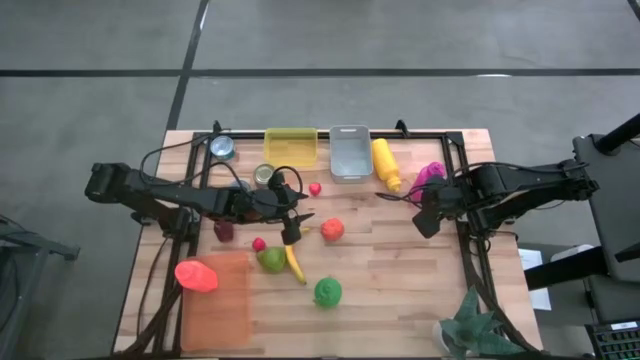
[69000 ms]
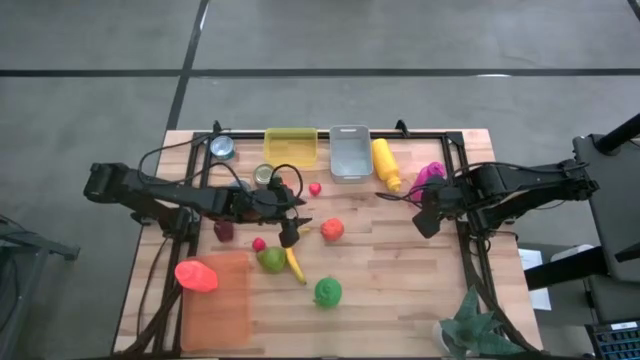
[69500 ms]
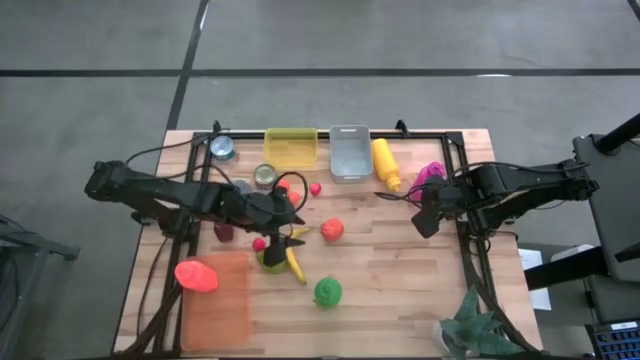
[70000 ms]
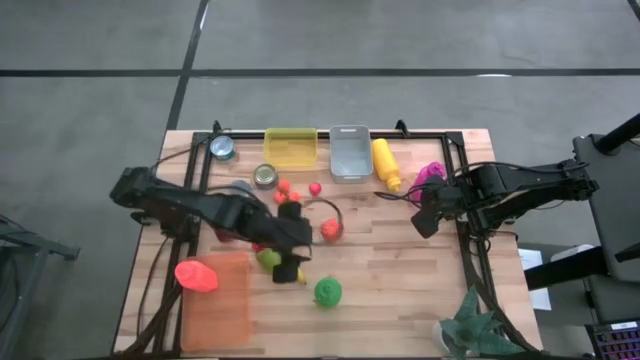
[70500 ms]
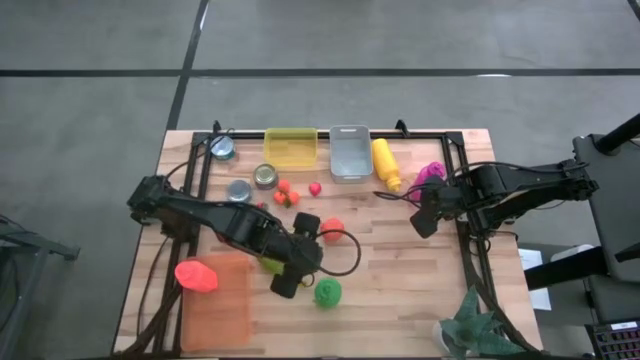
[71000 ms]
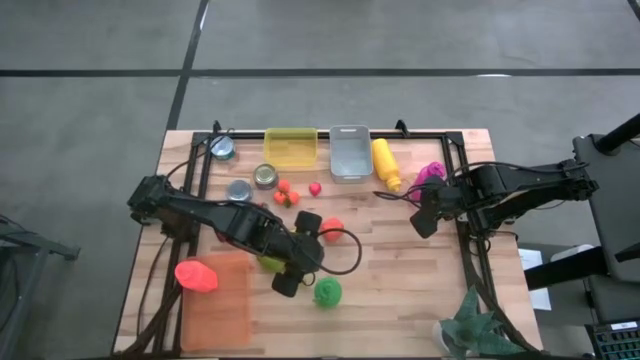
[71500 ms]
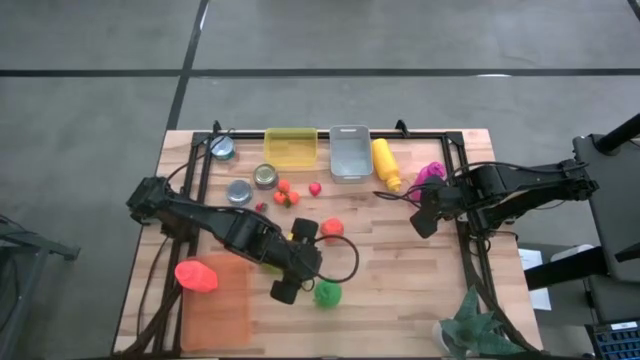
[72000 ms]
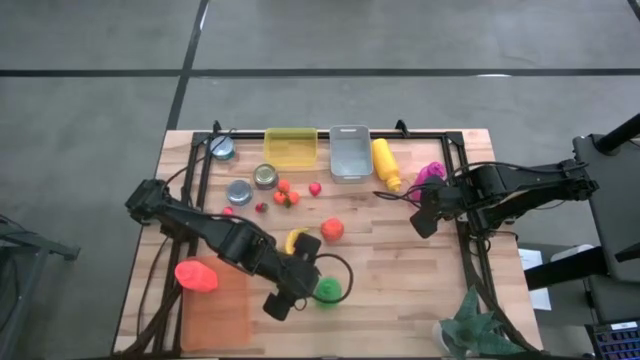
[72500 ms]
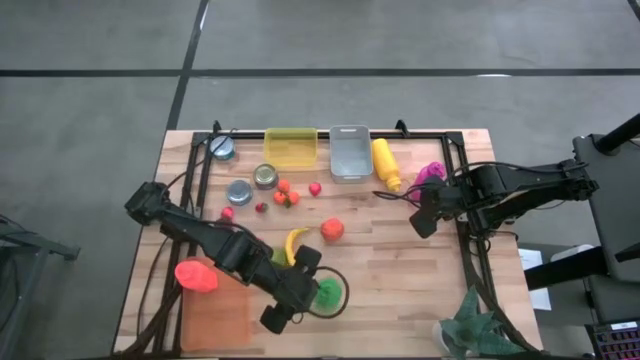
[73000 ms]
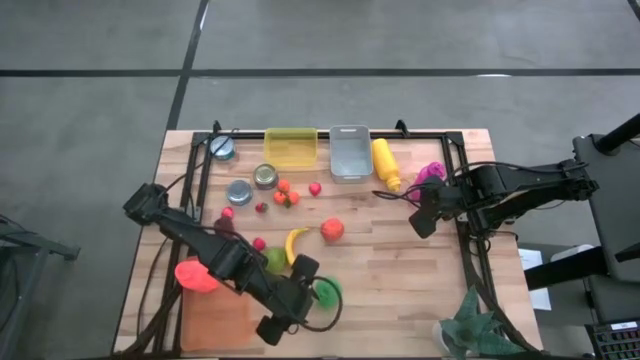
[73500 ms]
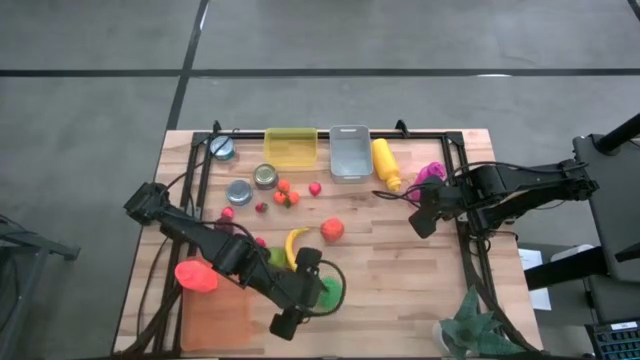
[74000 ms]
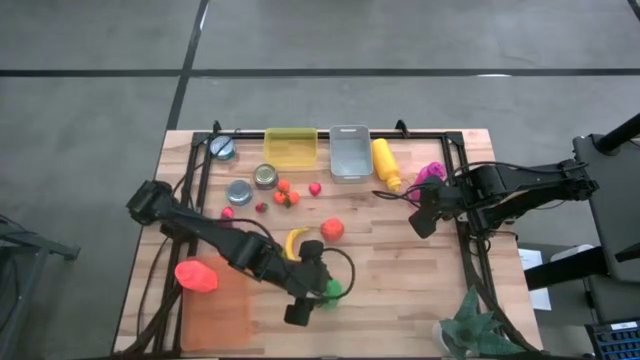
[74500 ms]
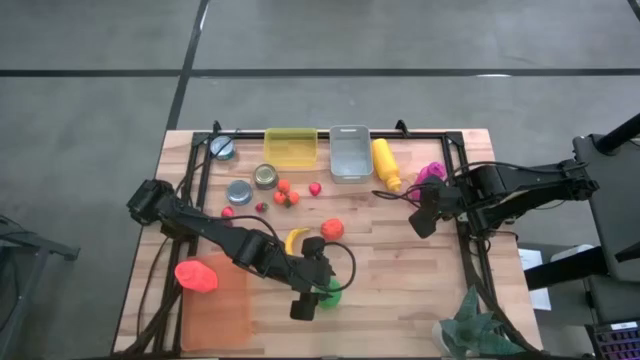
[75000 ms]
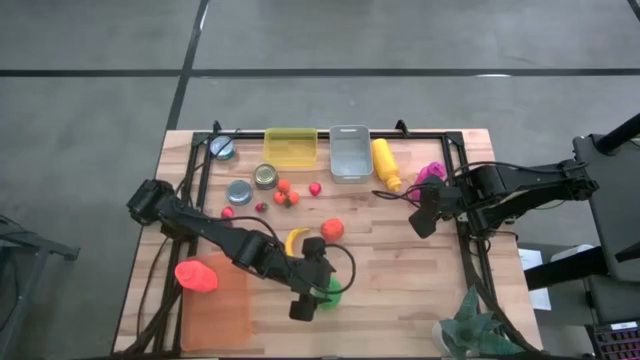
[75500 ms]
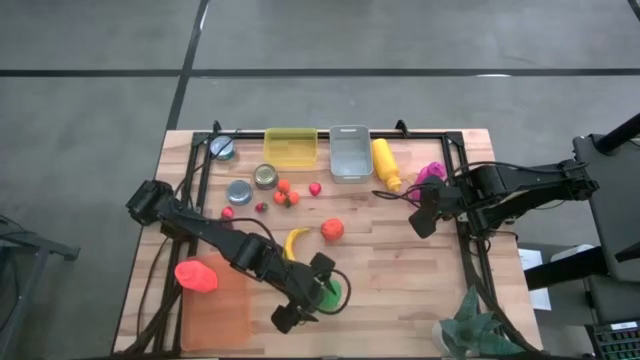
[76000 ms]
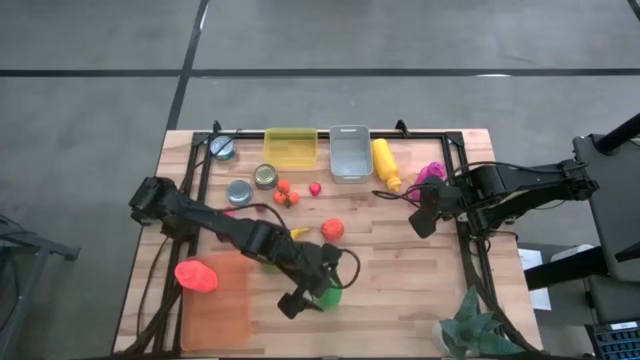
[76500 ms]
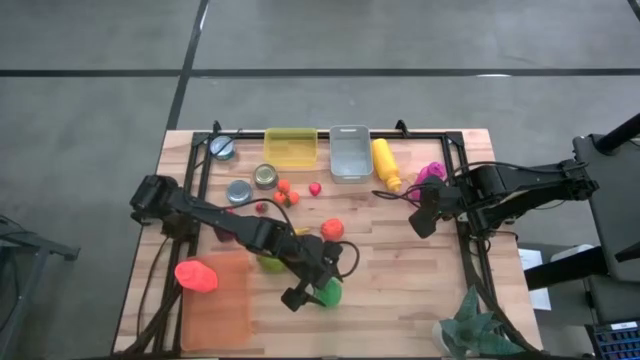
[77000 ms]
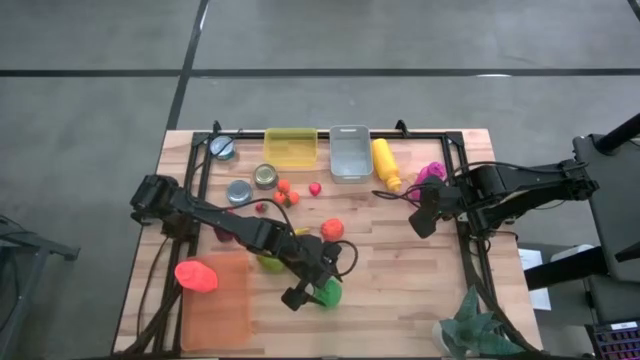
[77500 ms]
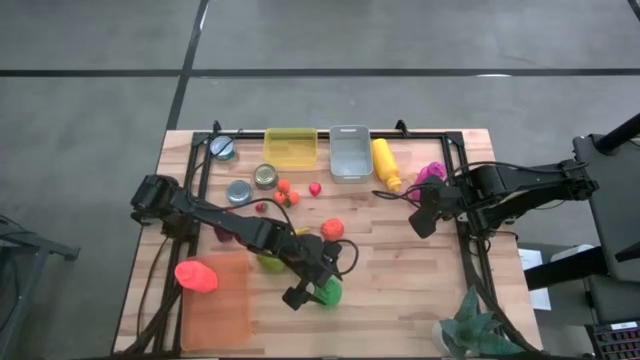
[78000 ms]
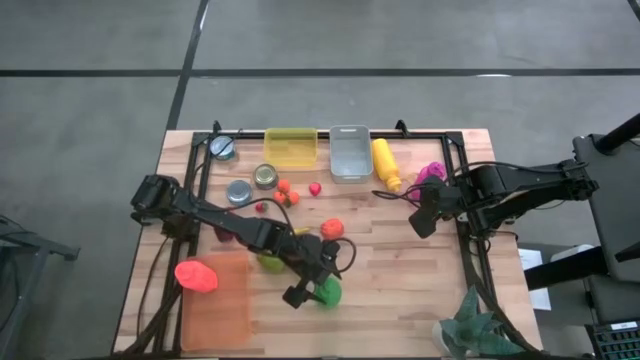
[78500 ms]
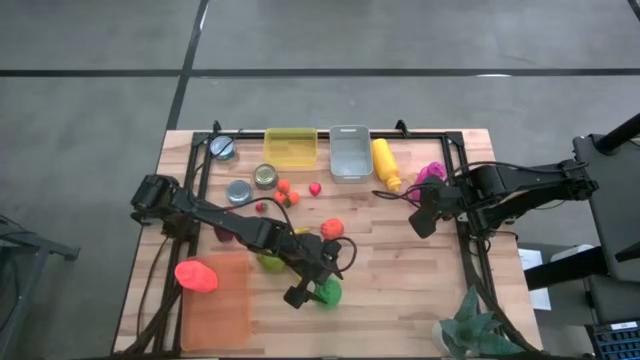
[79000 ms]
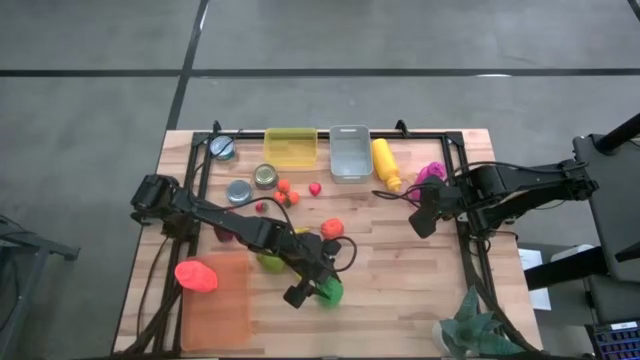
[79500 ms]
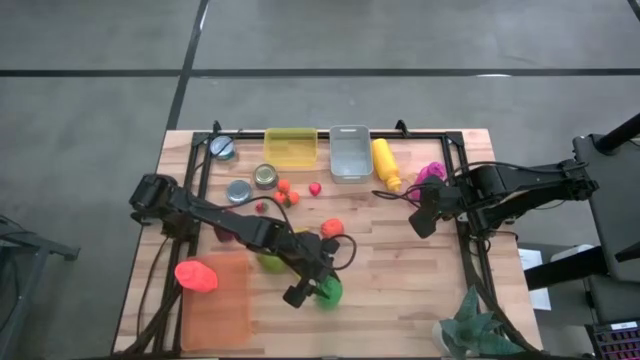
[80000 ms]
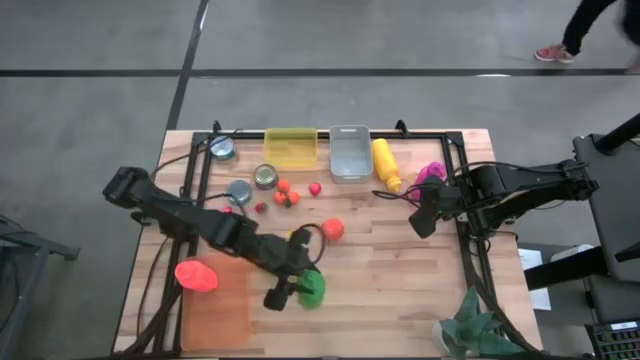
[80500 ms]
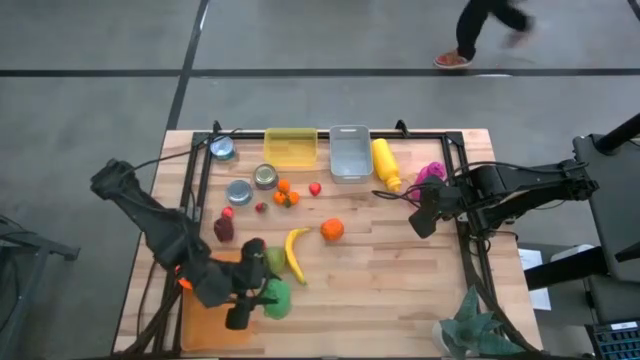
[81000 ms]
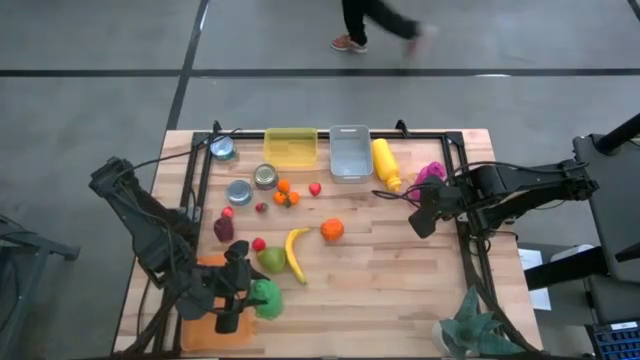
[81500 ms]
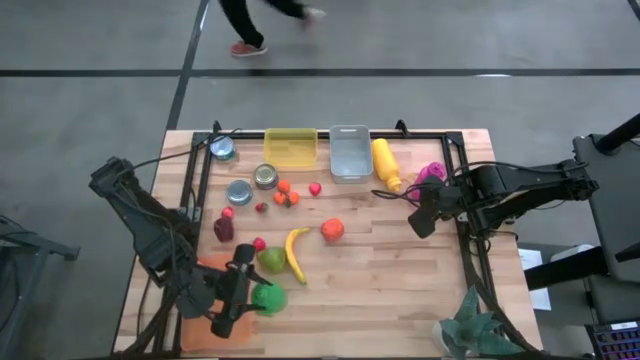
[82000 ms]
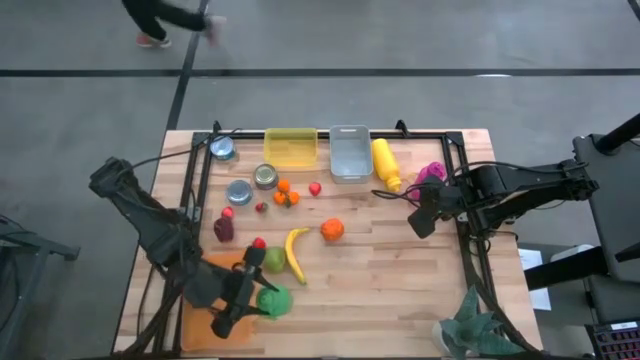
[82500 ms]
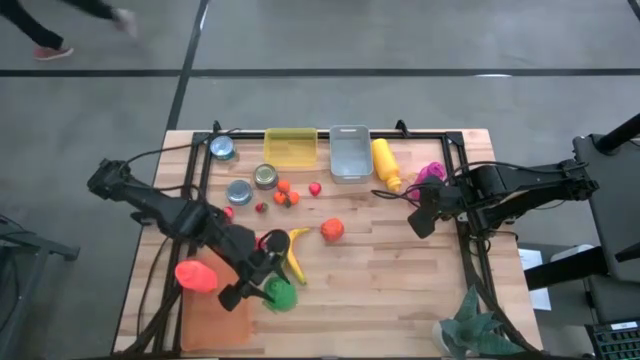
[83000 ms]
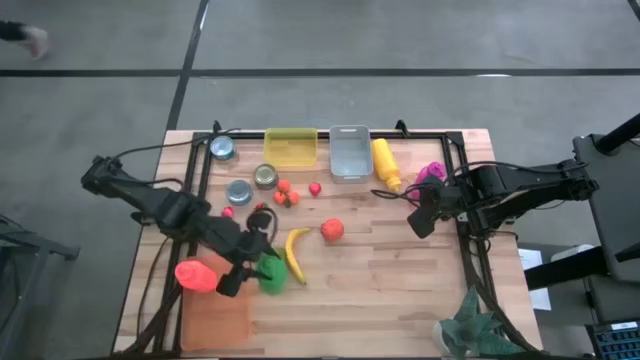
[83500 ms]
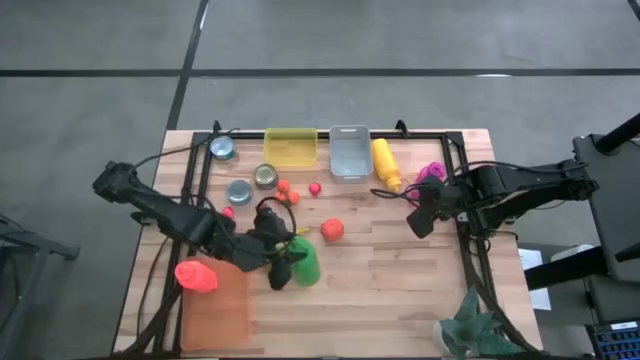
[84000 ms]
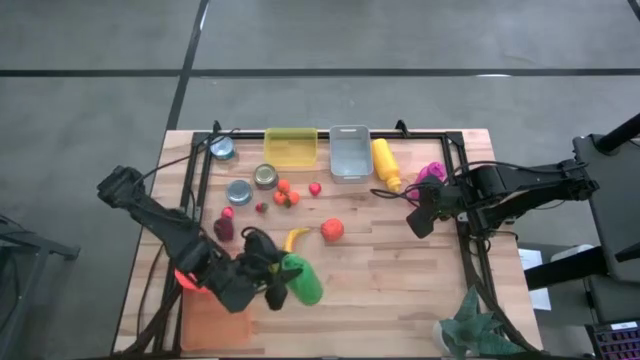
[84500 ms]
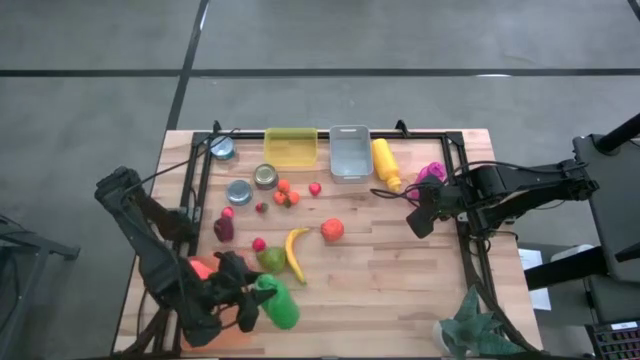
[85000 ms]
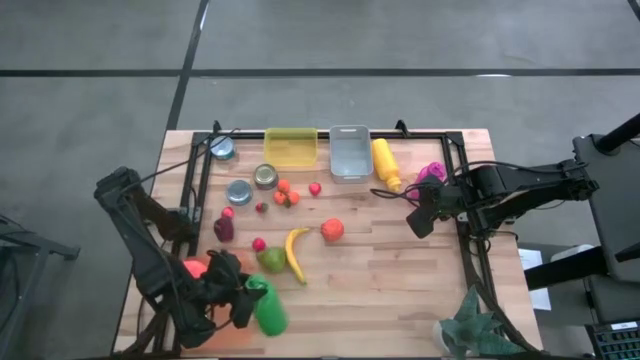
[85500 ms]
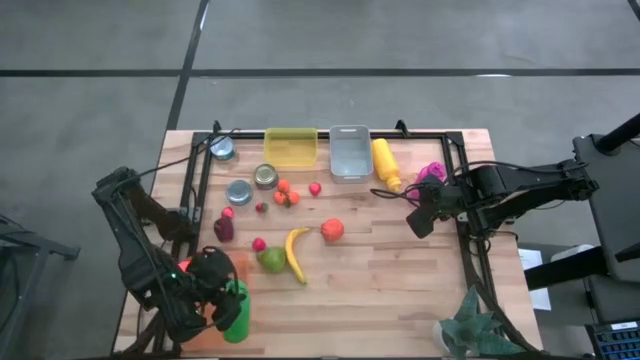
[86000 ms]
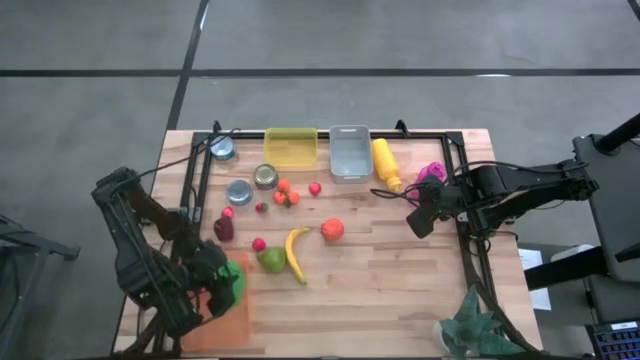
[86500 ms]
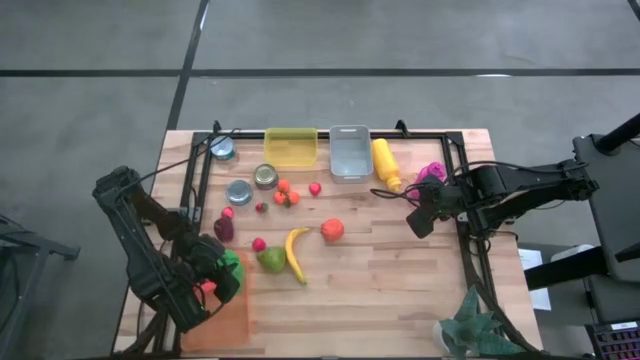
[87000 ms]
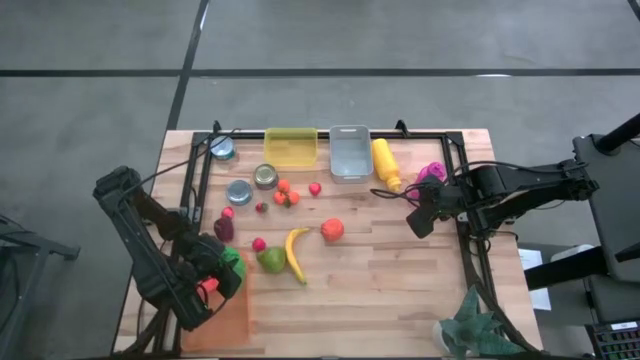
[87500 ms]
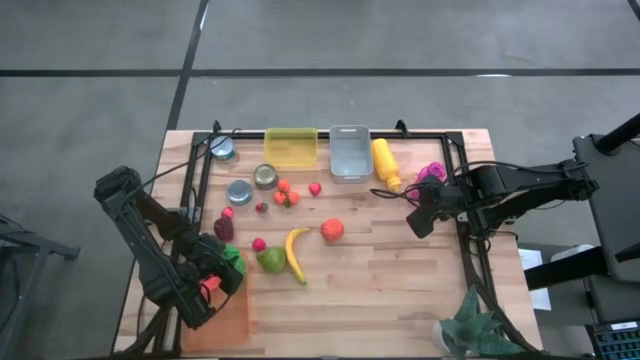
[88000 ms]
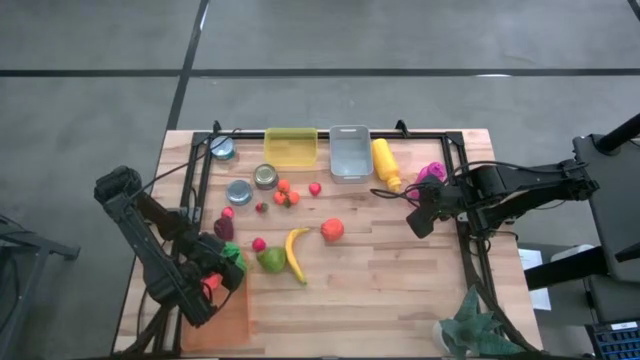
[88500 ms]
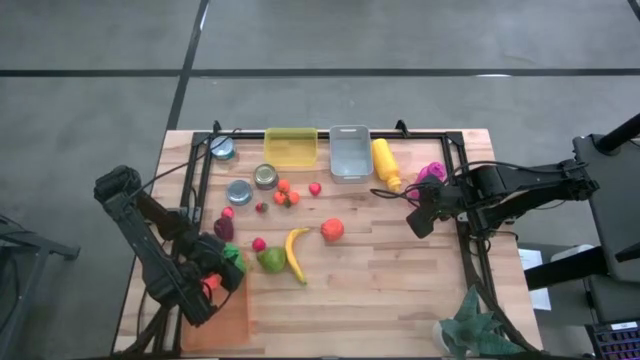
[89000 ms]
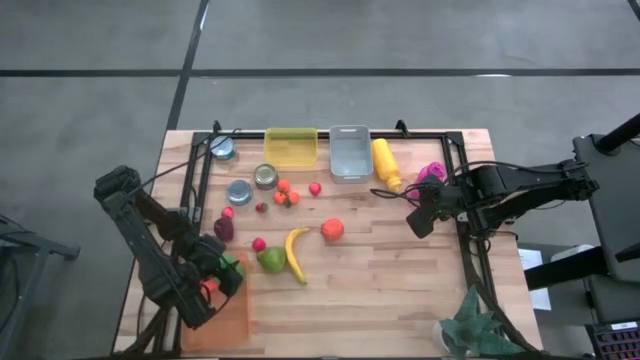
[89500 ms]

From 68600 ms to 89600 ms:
Task: Pick & Place Food Item
Put the green tumbler into the orange bin
